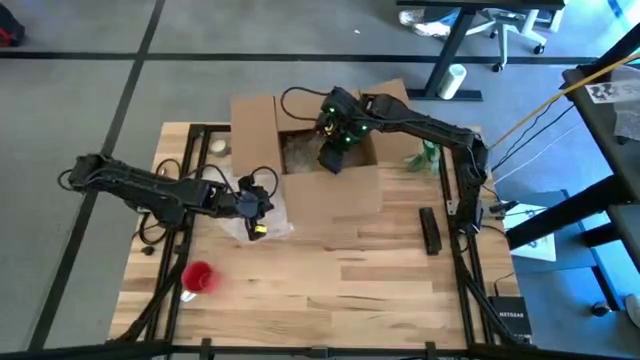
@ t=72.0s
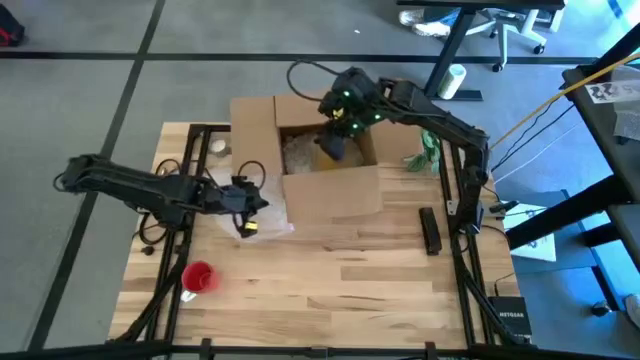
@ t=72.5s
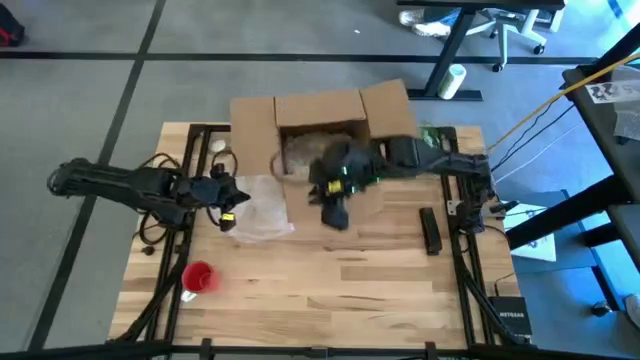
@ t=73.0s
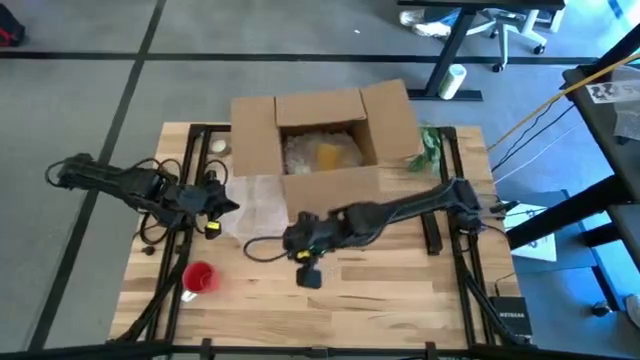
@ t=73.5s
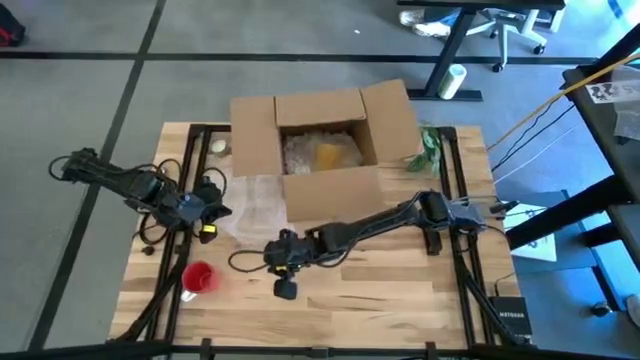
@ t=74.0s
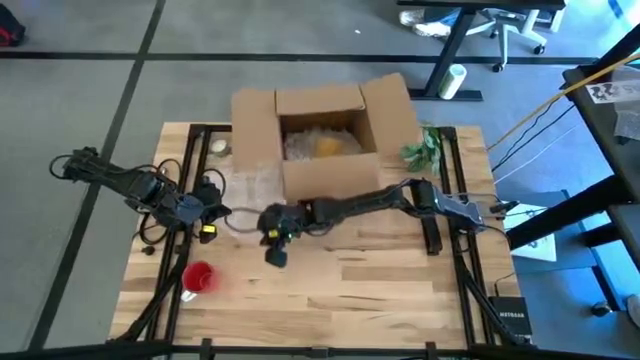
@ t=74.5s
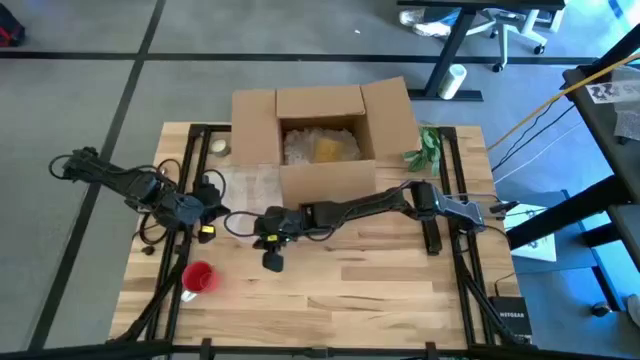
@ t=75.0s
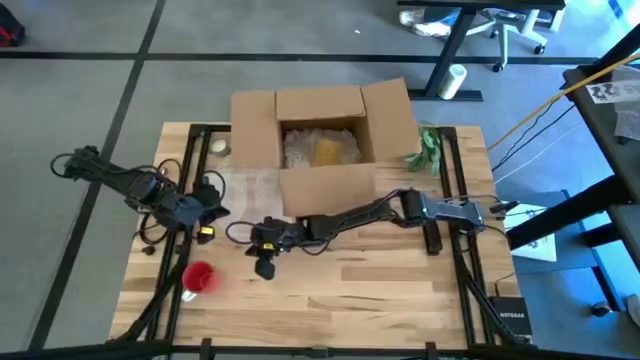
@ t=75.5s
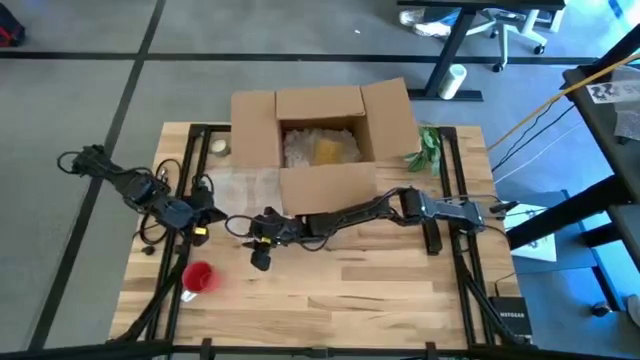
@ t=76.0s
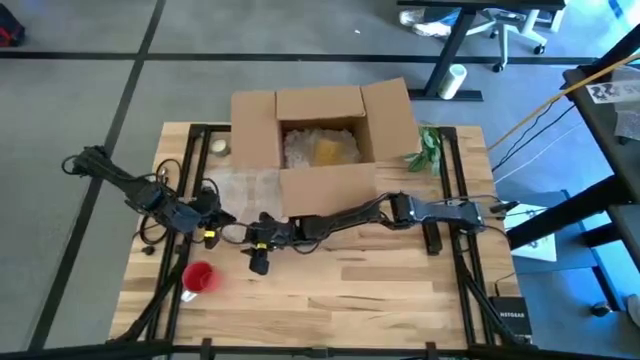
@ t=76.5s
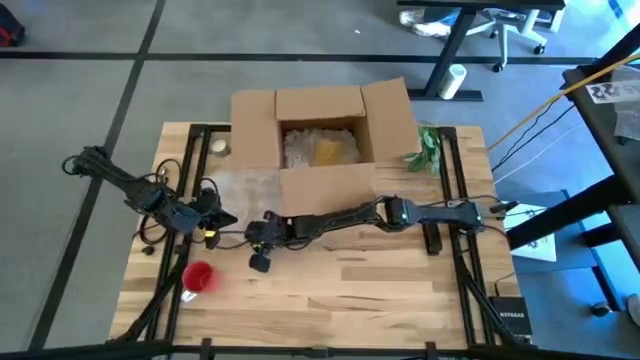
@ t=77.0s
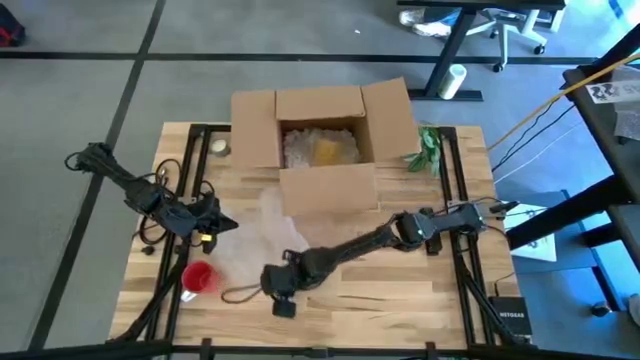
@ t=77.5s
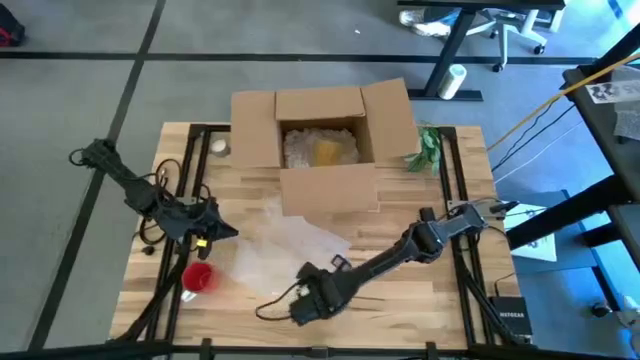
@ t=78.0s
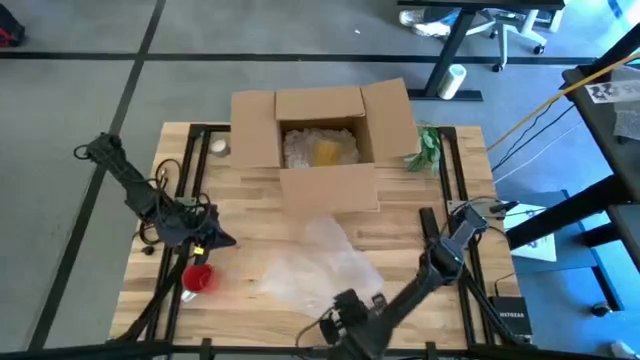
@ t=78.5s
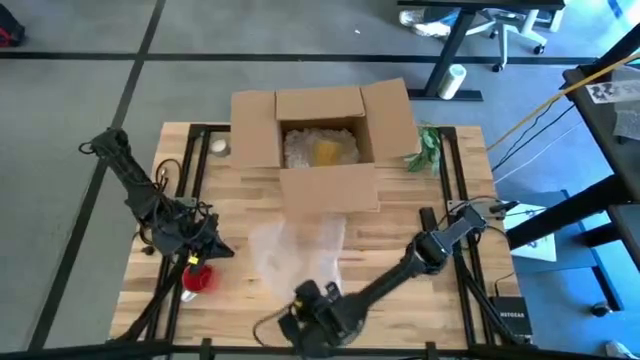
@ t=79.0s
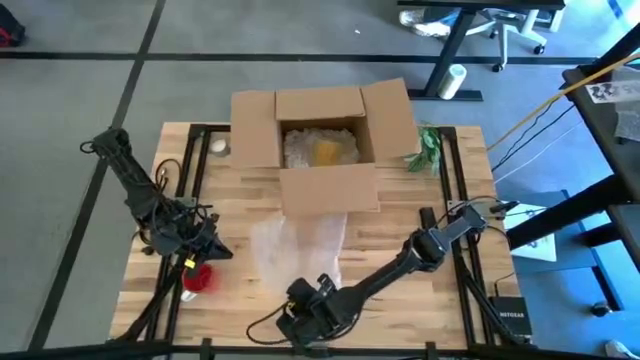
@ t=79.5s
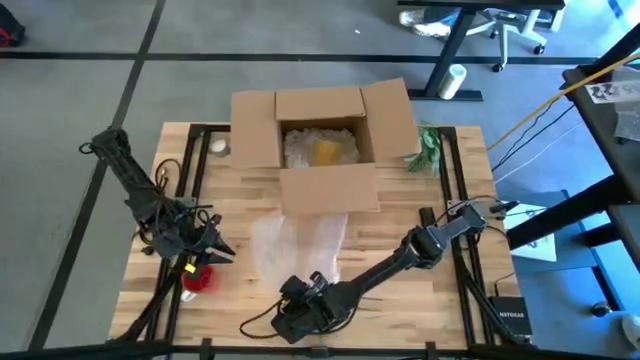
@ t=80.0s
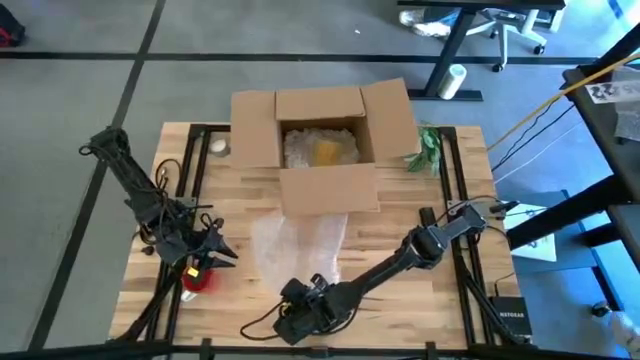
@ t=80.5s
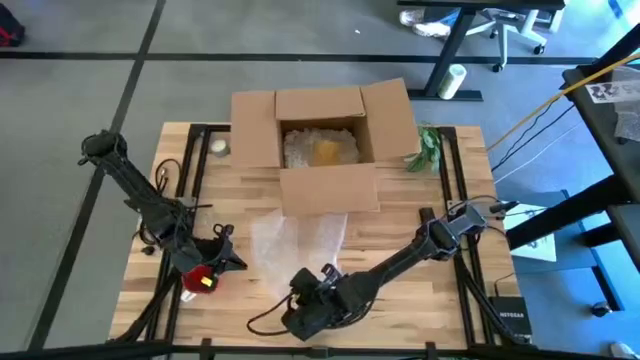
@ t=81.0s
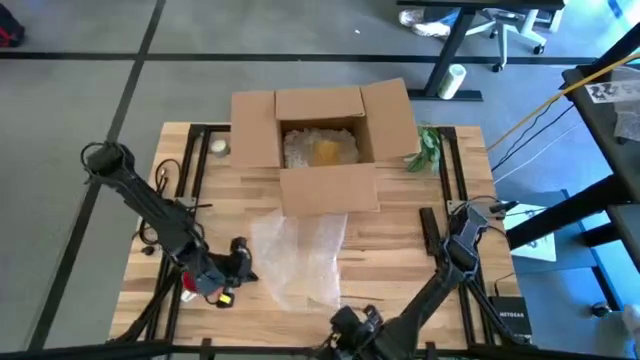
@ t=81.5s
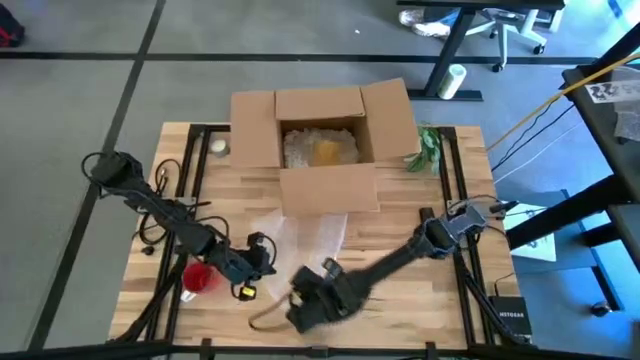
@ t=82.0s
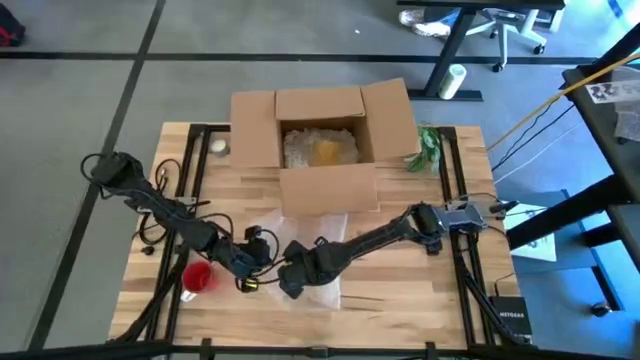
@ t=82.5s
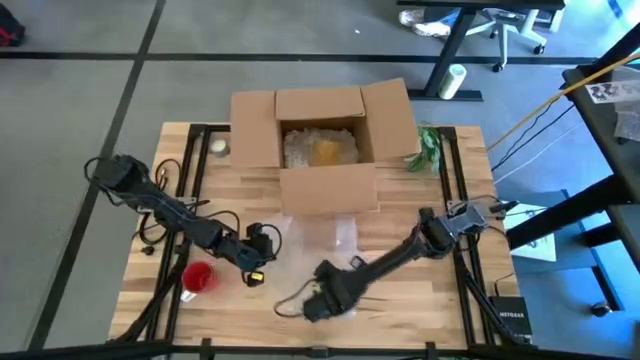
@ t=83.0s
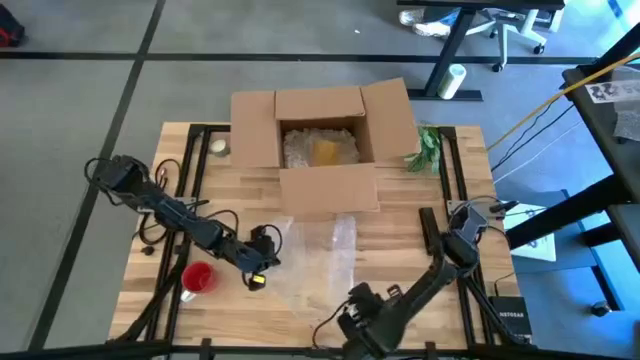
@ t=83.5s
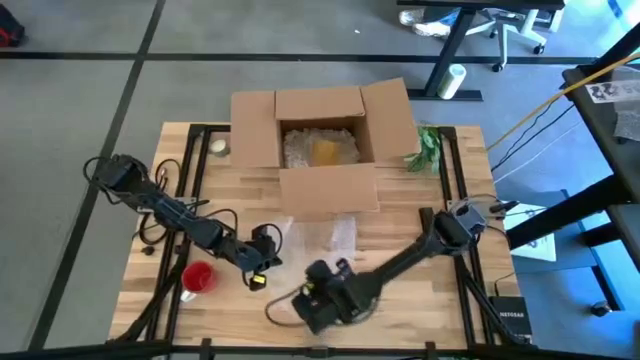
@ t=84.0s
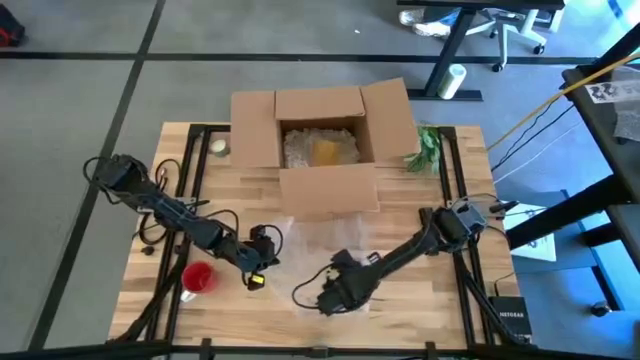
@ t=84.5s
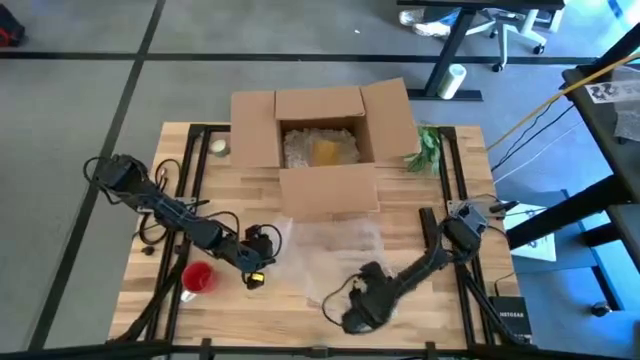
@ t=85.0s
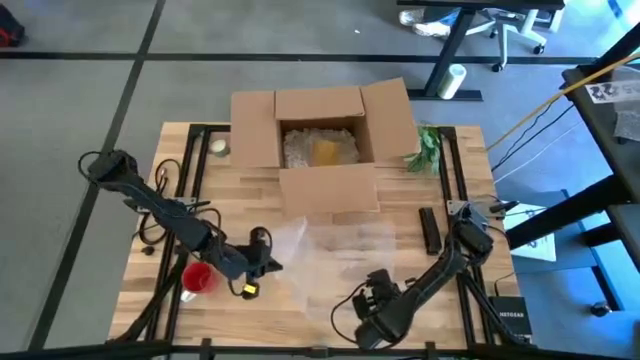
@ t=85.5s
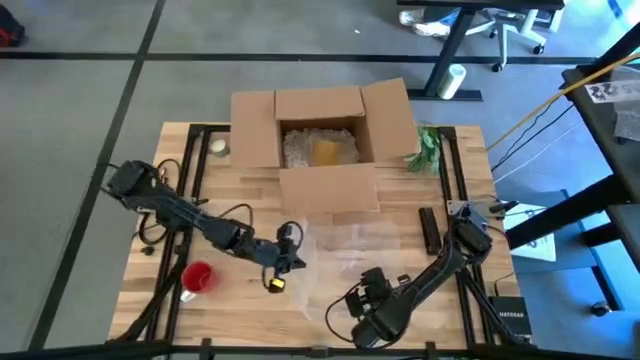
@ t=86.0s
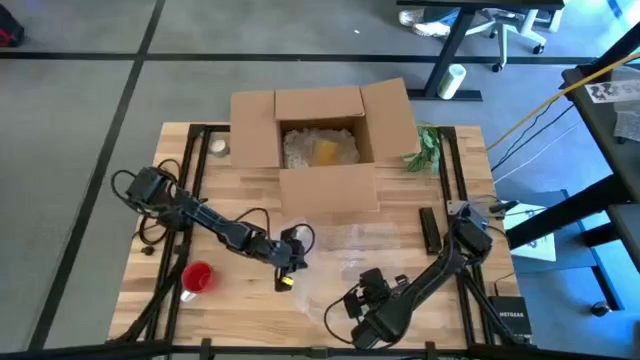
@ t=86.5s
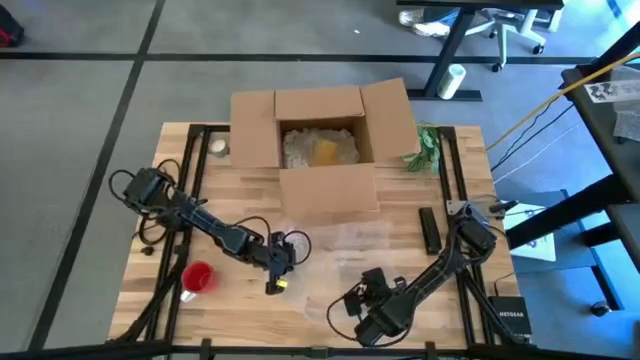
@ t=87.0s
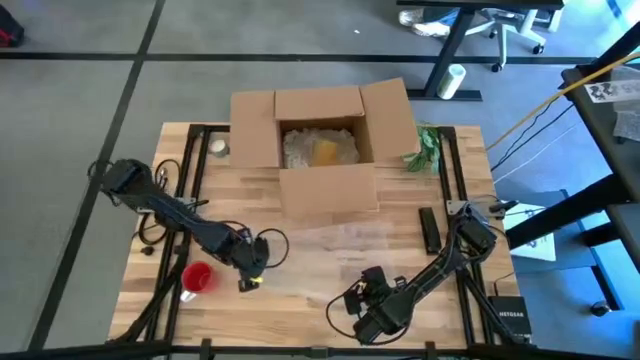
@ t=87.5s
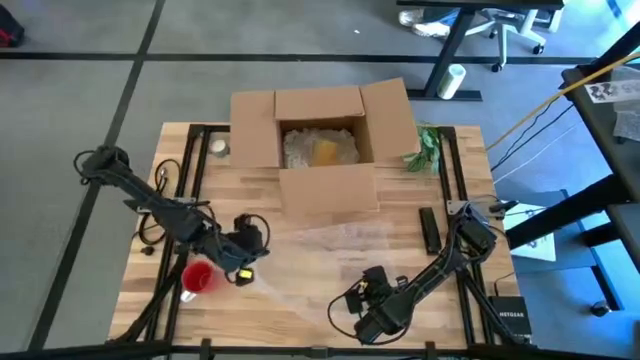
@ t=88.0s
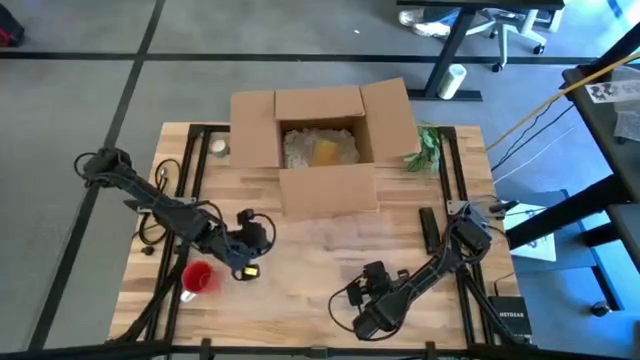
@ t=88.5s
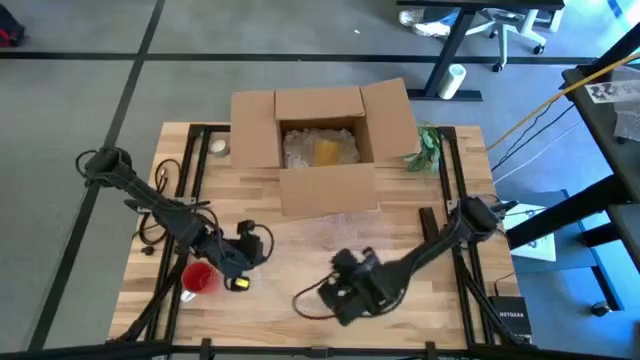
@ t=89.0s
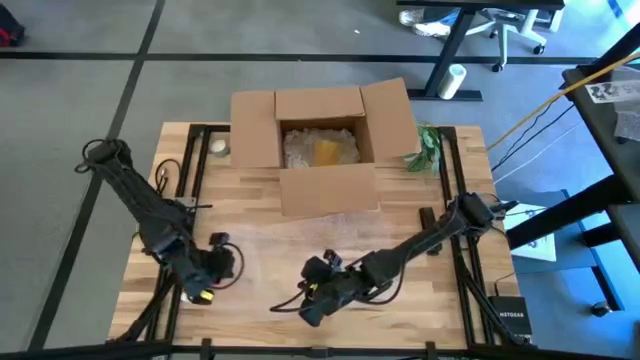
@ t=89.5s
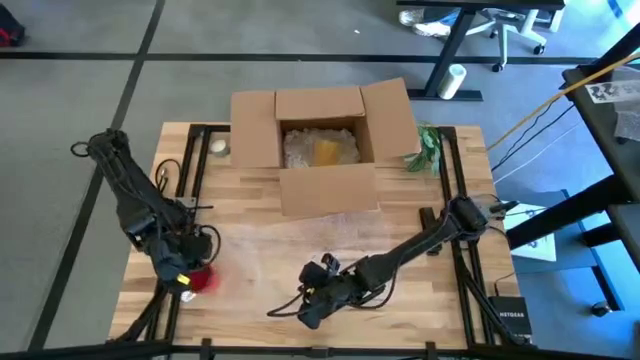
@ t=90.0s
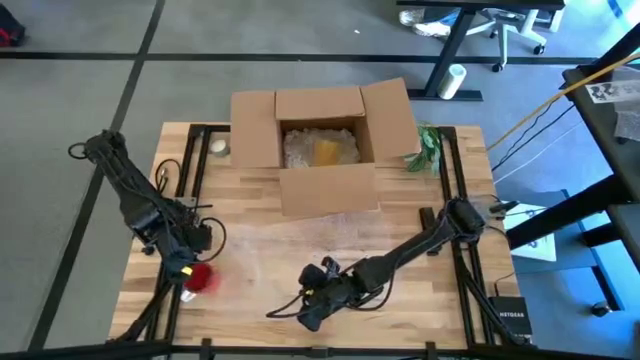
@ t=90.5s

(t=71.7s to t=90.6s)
Task: wrap mug
Wrap the red mug with the transparent bubble wrap

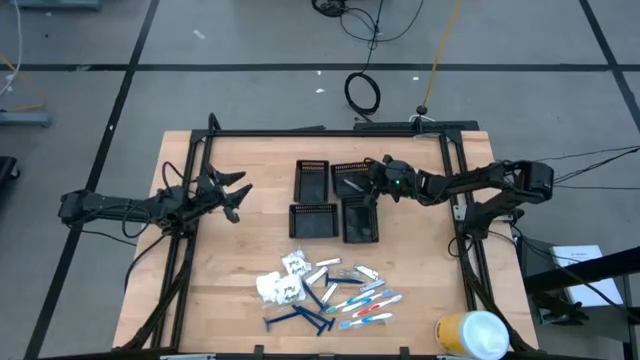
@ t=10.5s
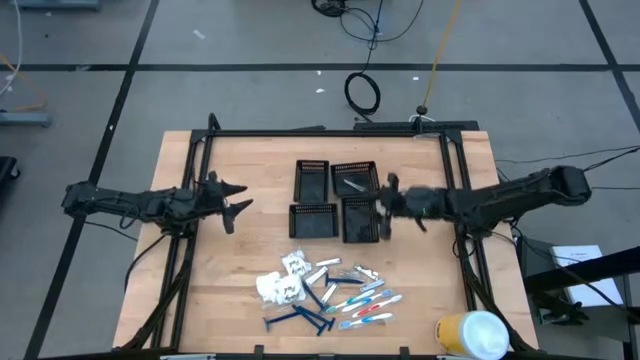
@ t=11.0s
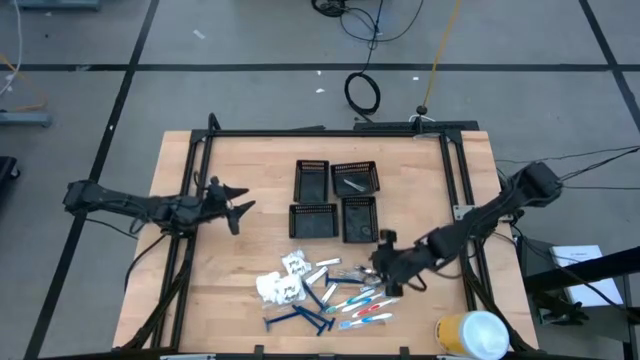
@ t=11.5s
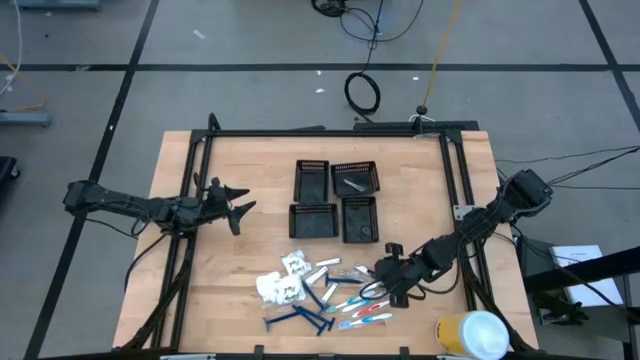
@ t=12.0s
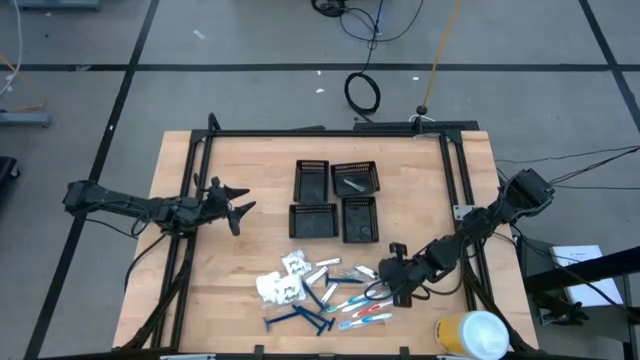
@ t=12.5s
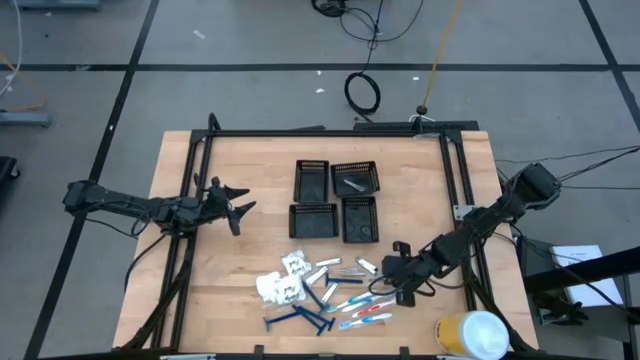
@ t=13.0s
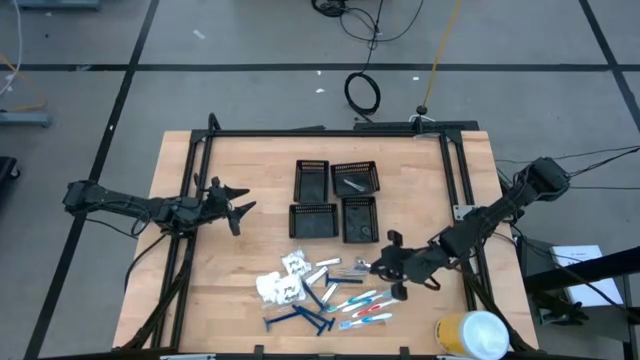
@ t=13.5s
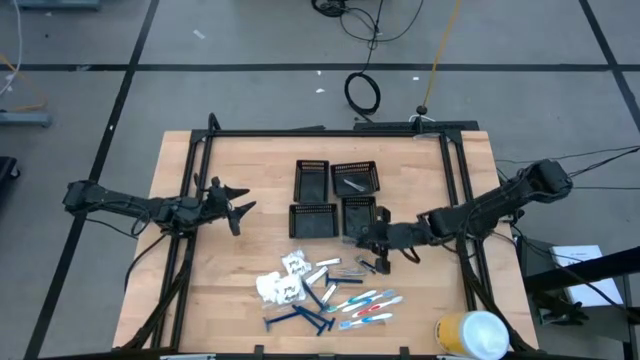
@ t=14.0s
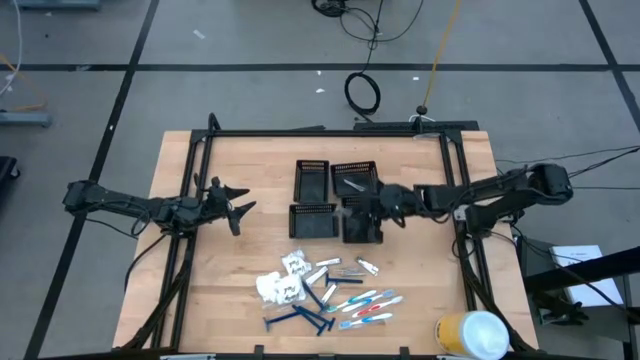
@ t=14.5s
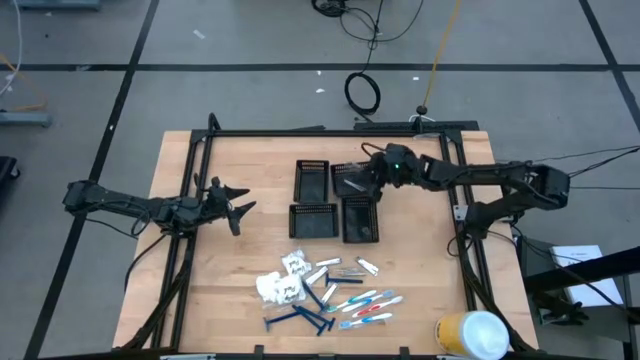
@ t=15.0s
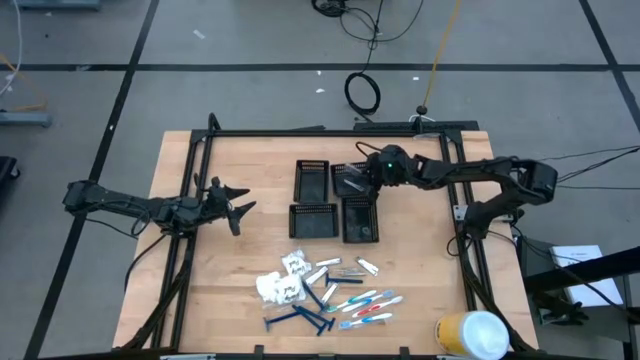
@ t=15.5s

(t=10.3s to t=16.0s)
Task: Pick & Place Travel size toiletries
Put the silver nail cutter into the top right black bin
